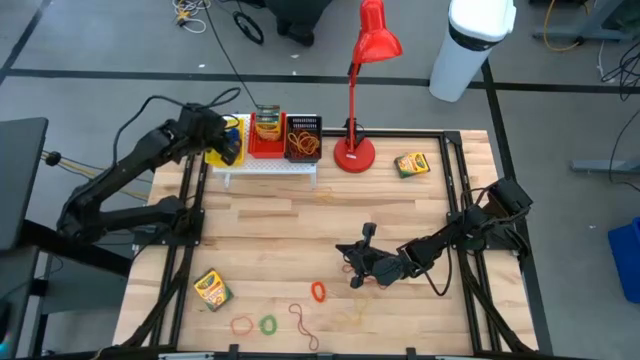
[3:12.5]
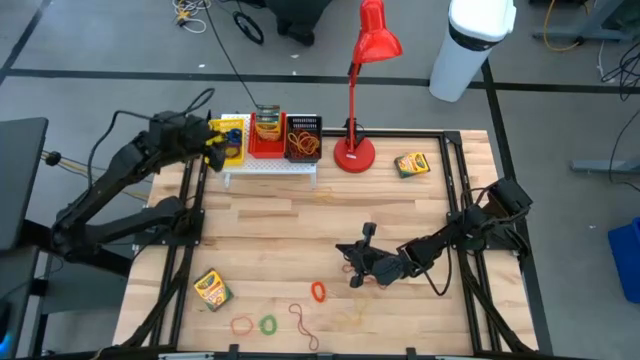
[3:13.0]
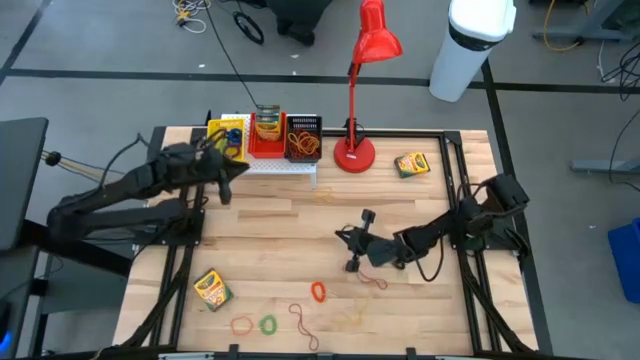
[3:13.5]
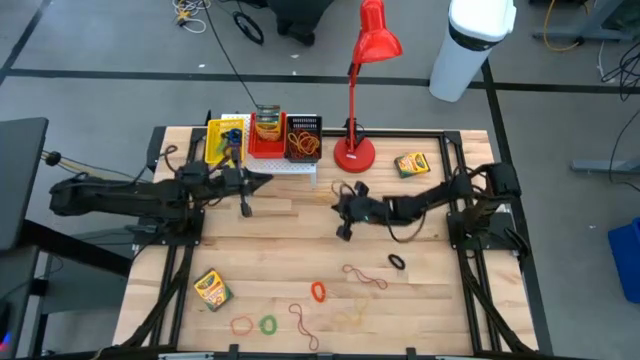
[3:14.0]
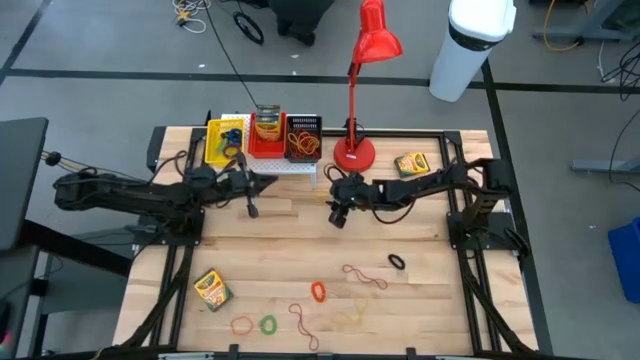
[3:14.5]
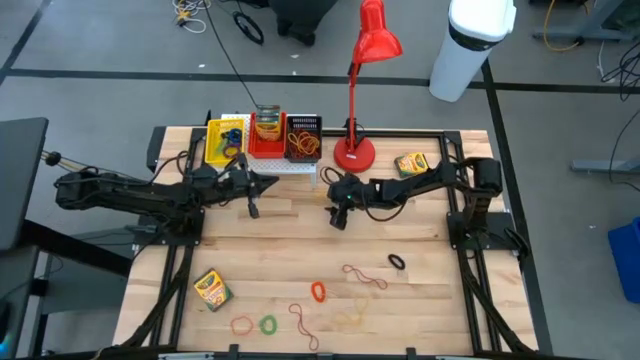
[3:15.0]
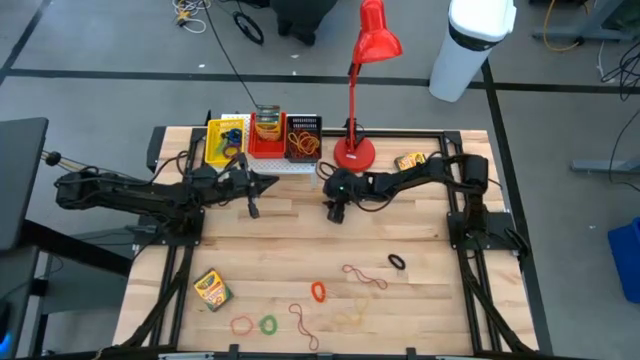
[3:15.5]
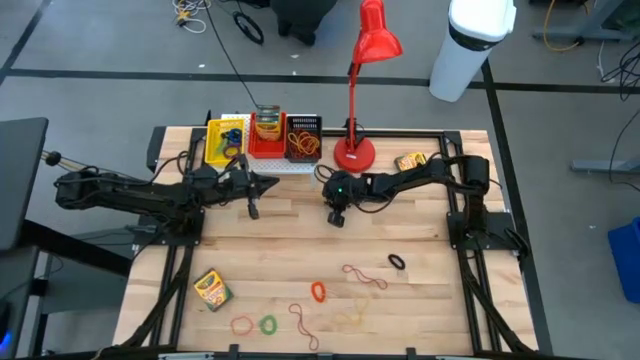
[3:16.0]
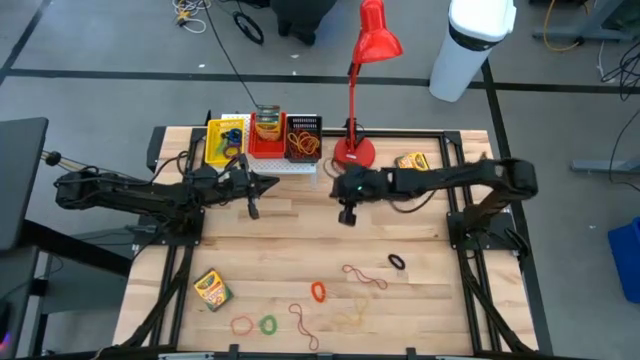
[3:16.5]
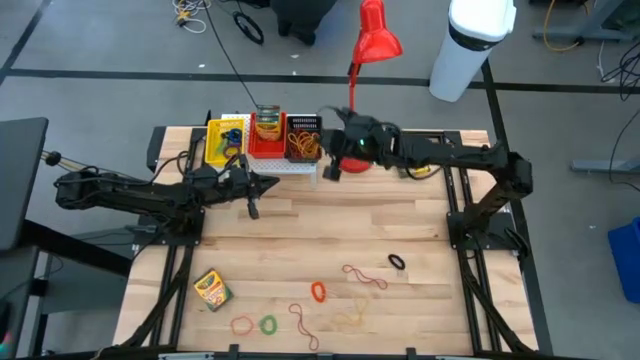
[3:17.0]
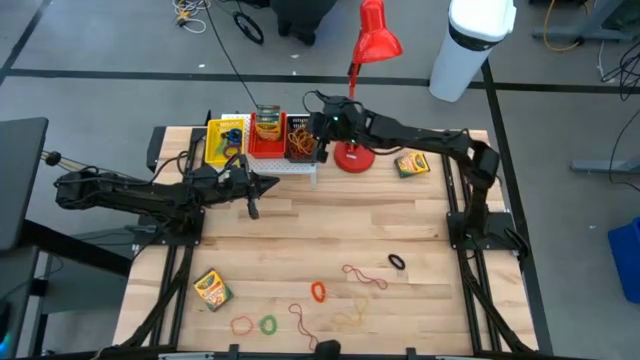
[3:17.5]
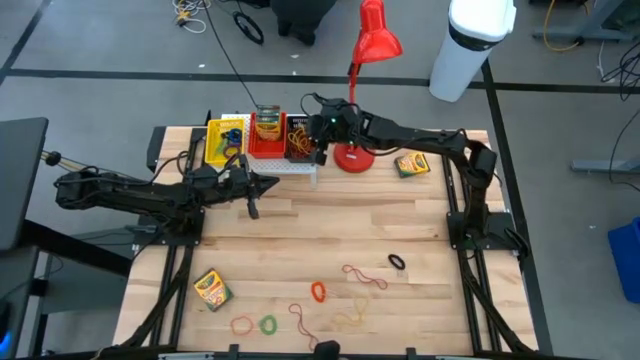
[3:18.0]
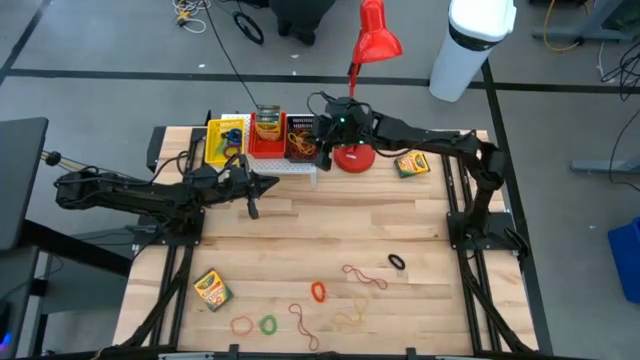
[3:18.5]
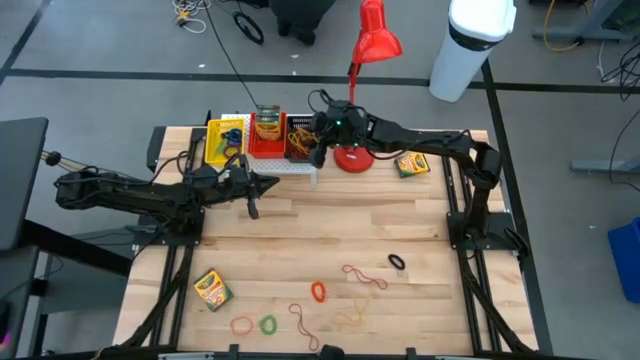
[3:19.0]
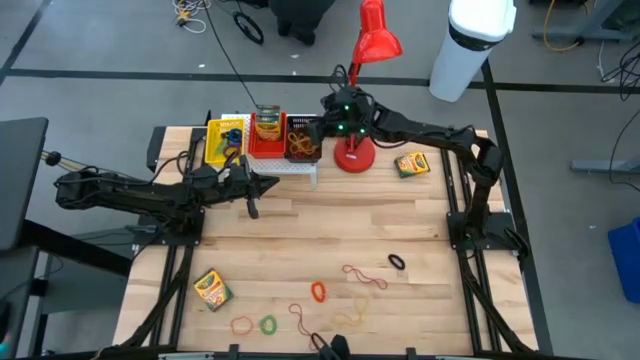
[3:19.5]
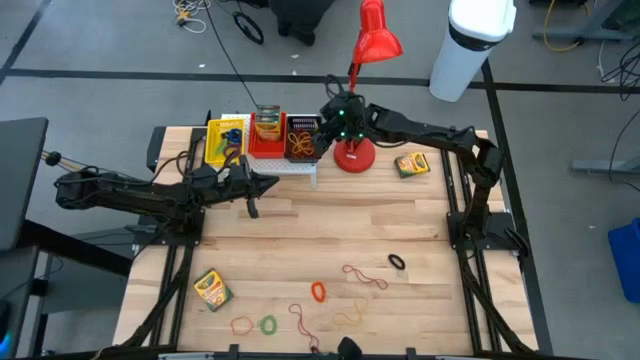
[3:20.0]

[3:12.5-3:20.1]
Task: Pick & Place Office Desk Supplies
Put the yellow rubber band into the black bin on the shelf

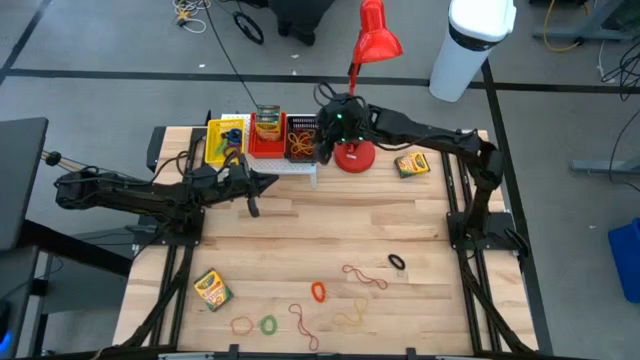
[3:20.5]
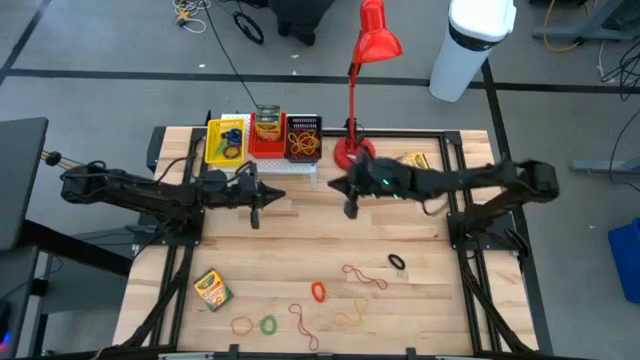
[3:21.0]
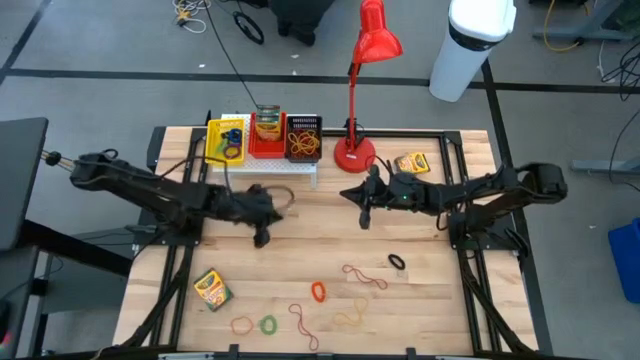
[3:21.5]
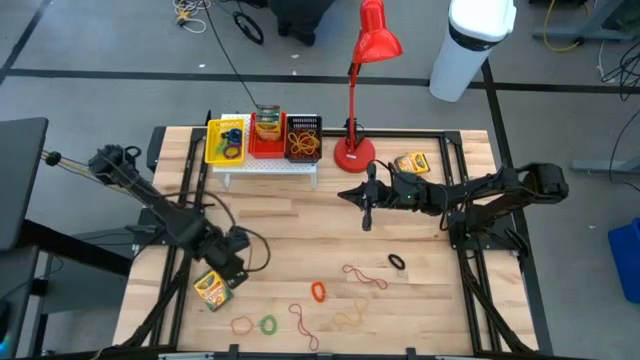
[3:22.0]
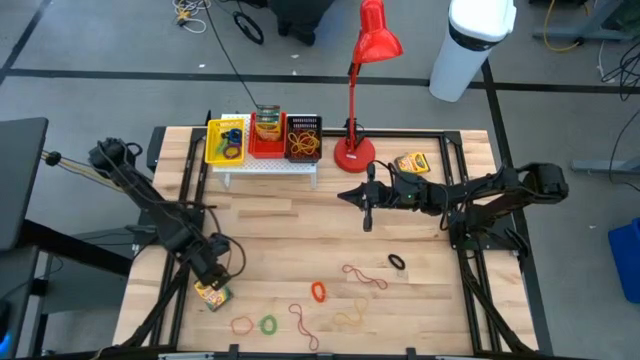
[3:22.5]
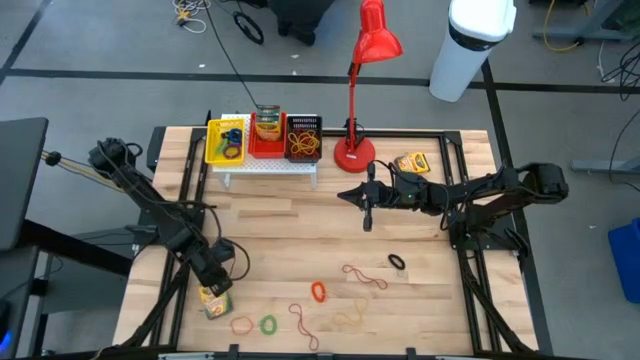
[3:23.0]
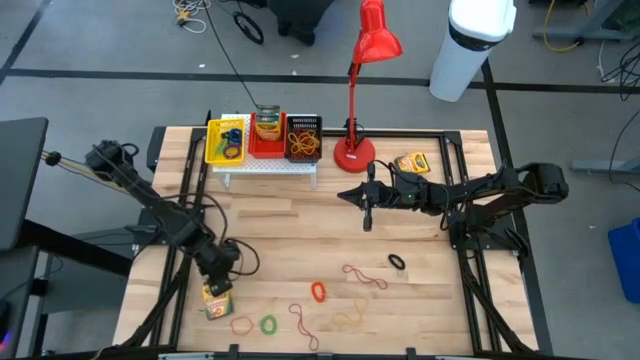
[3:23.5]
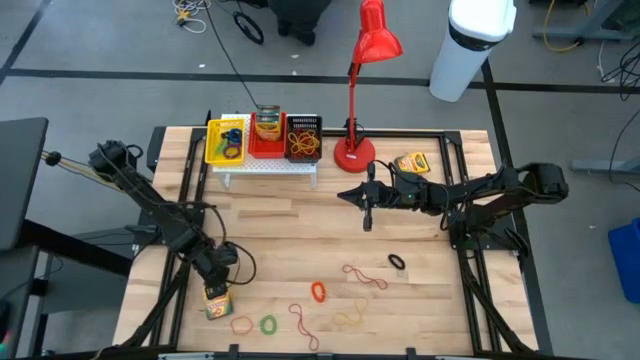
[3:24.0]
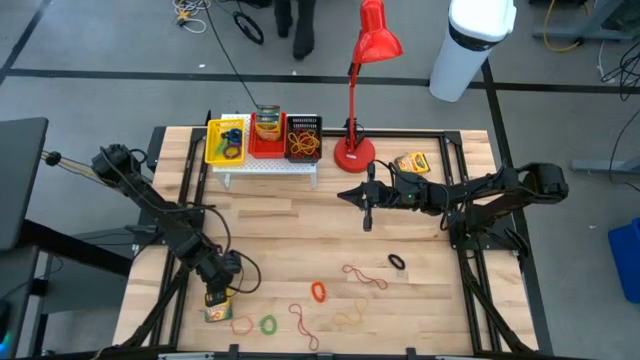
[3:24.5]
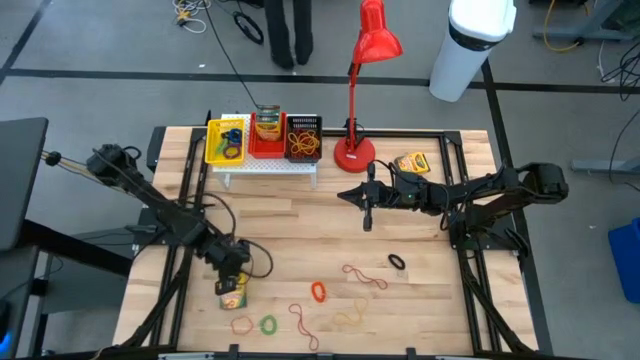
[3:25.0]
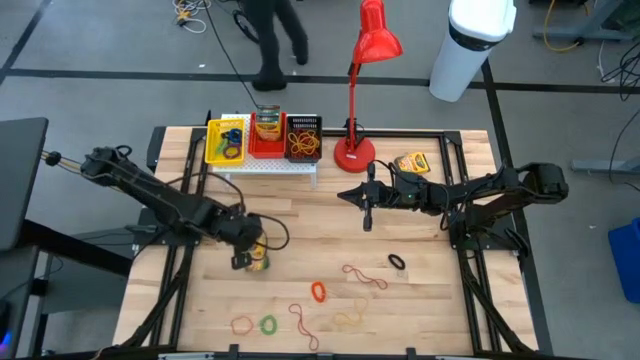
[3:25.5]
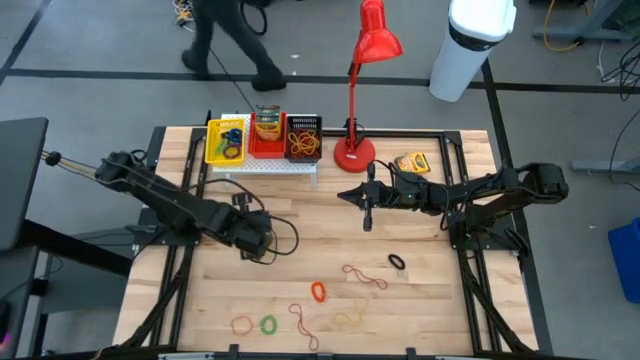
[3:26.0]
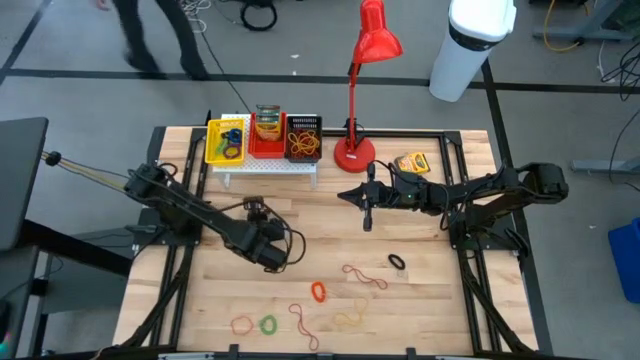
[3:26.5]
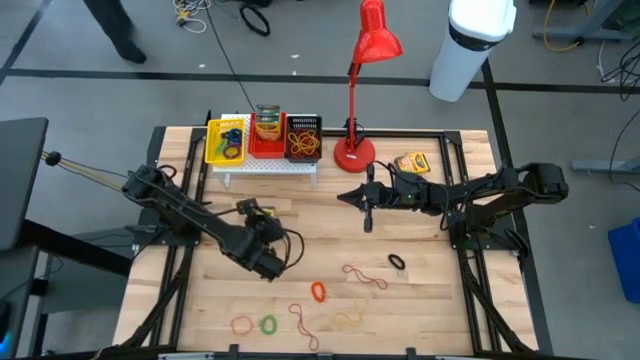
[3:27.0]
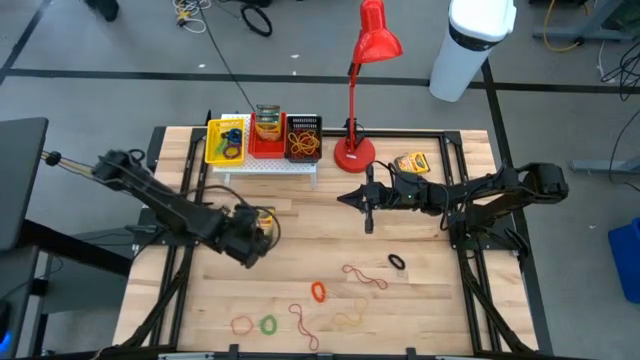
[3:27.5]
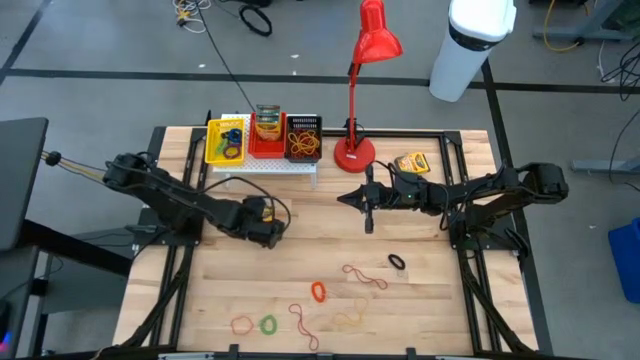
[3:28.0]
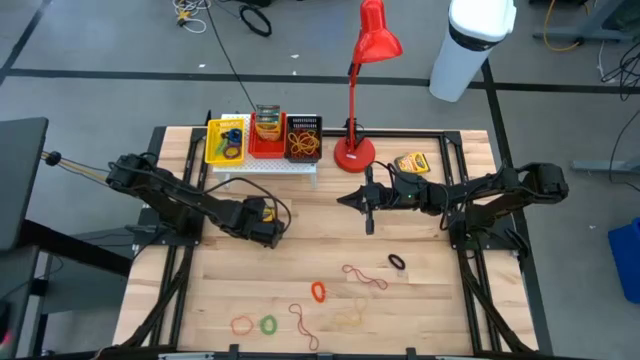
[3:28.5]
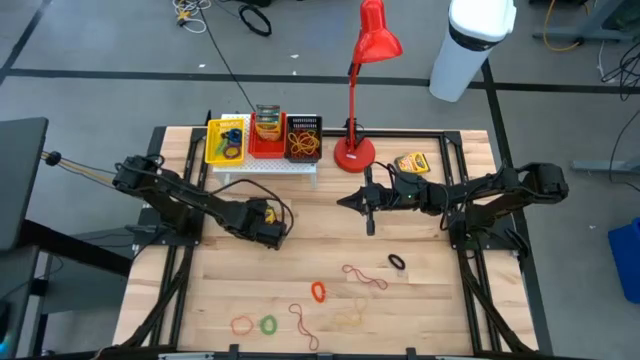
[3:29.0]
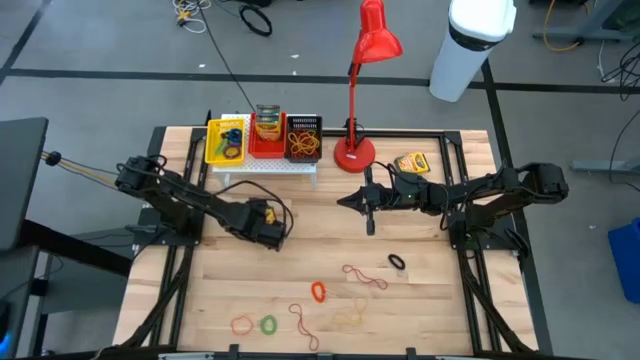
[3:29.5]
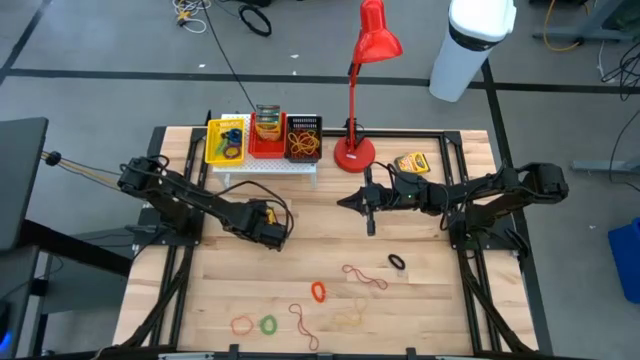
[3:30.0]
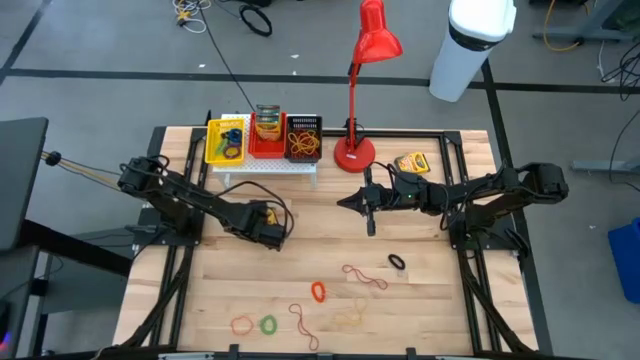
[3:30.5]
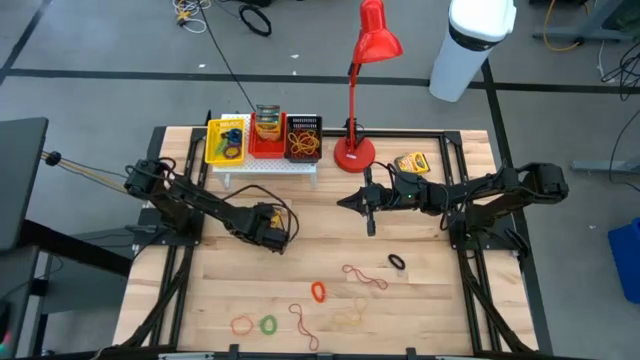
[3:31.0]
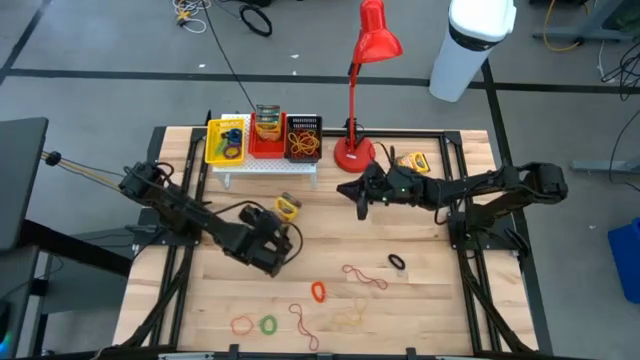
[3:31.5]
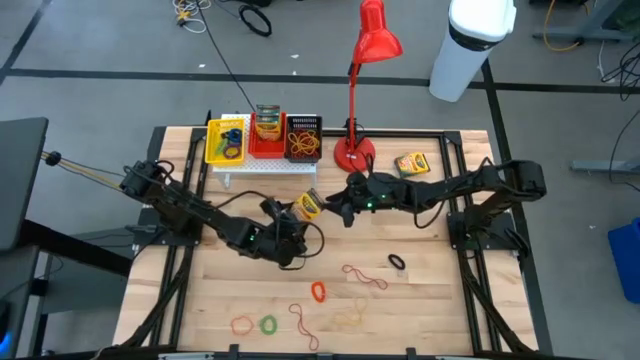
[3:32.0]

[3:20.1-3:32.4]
Put the crayon box into the red bin on the shelf
